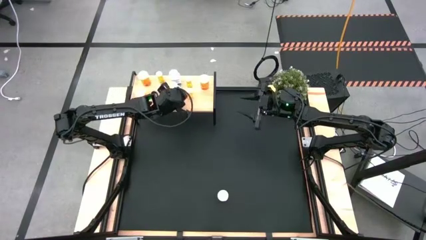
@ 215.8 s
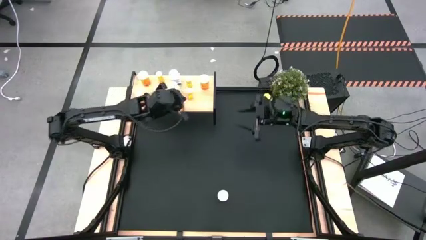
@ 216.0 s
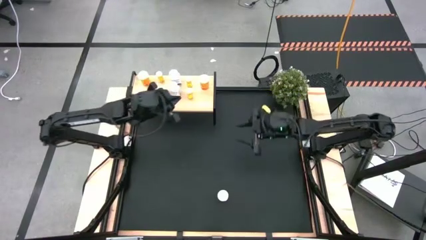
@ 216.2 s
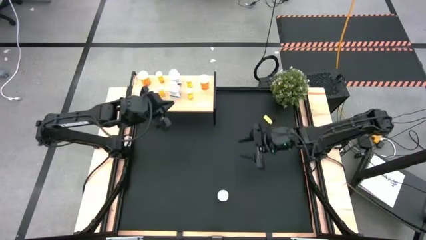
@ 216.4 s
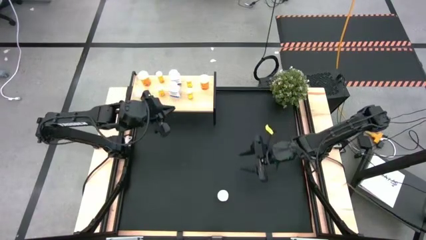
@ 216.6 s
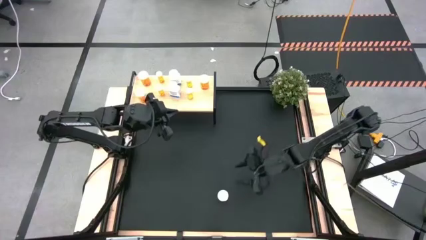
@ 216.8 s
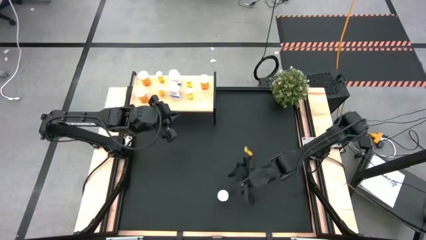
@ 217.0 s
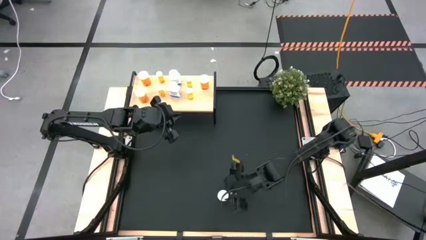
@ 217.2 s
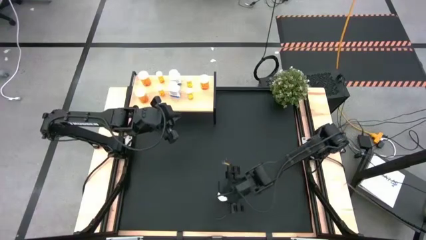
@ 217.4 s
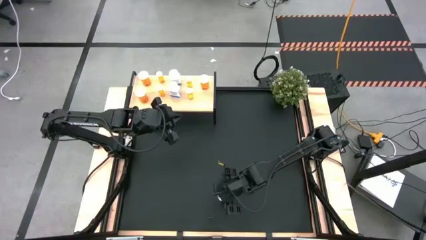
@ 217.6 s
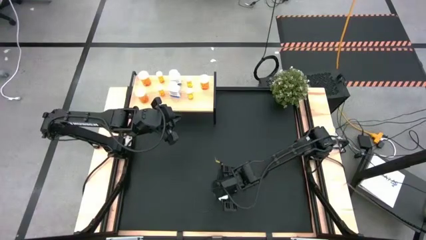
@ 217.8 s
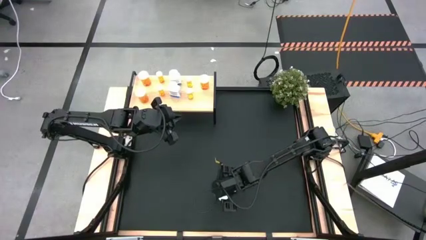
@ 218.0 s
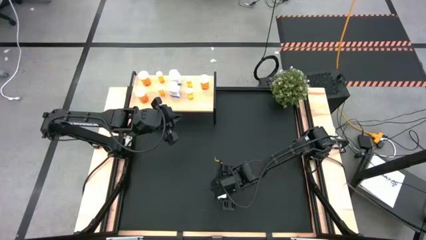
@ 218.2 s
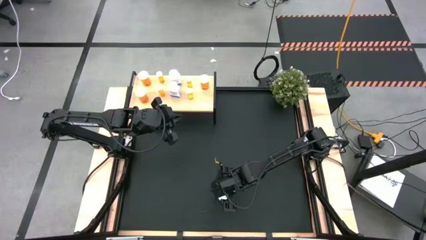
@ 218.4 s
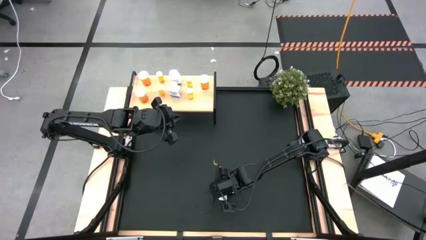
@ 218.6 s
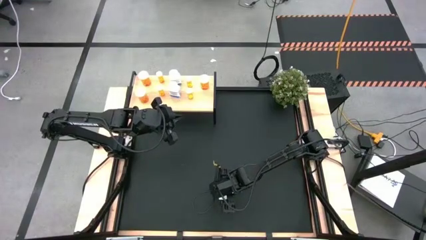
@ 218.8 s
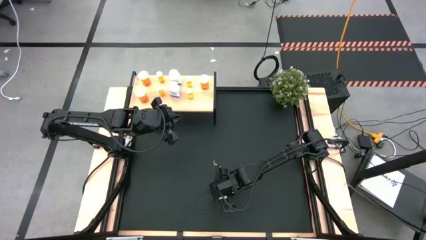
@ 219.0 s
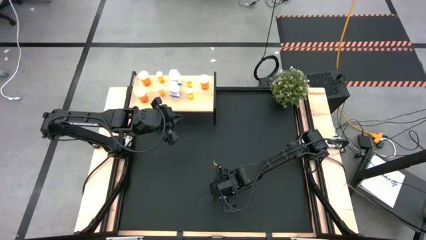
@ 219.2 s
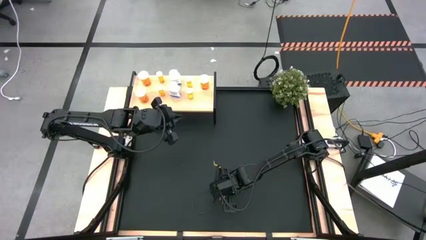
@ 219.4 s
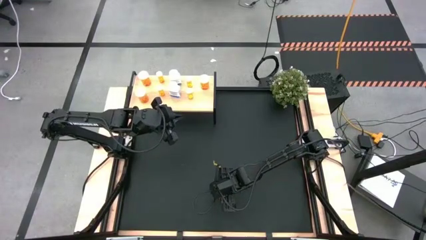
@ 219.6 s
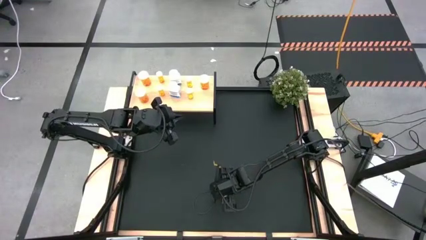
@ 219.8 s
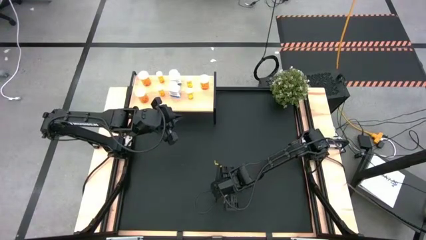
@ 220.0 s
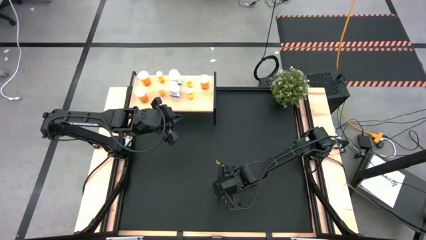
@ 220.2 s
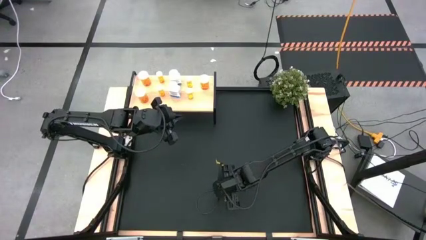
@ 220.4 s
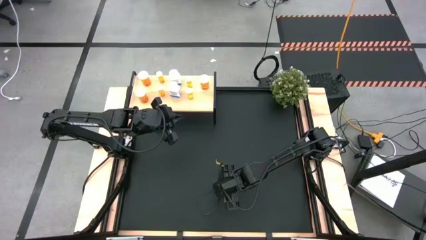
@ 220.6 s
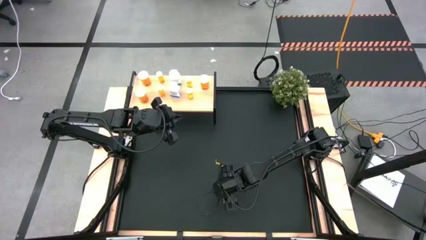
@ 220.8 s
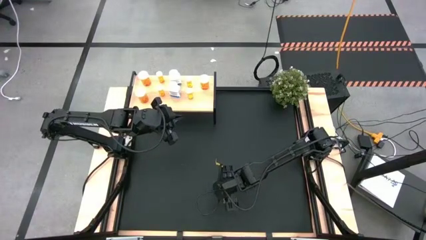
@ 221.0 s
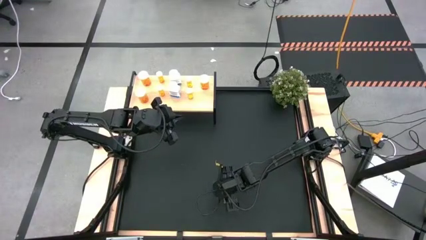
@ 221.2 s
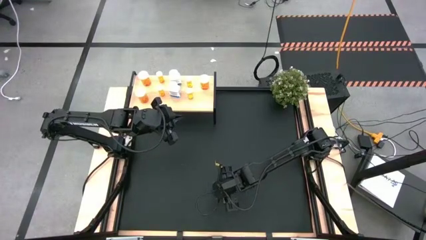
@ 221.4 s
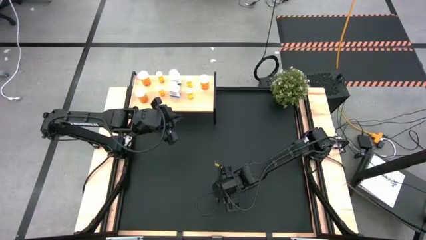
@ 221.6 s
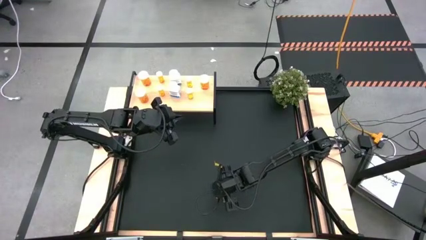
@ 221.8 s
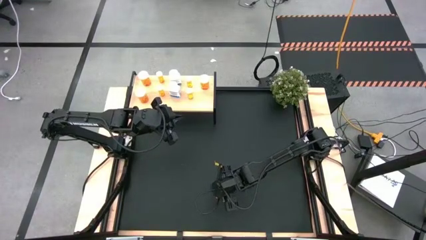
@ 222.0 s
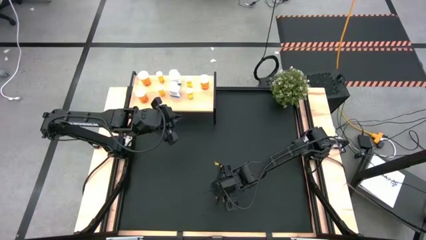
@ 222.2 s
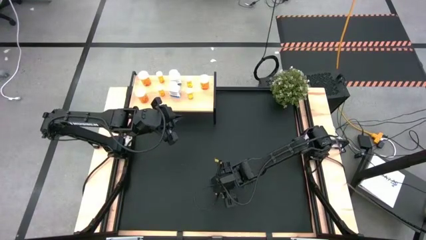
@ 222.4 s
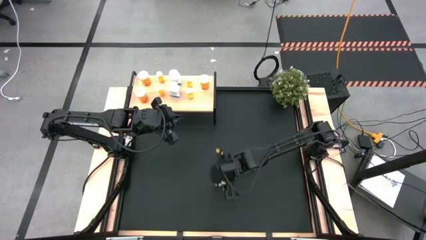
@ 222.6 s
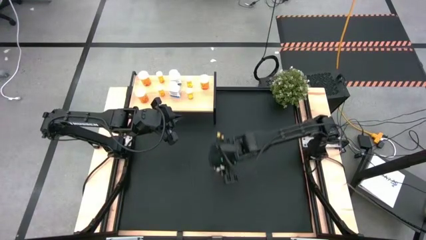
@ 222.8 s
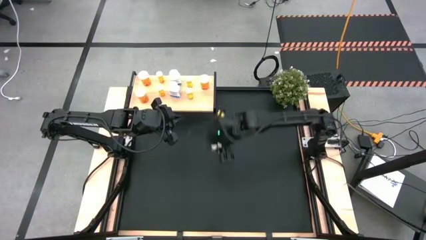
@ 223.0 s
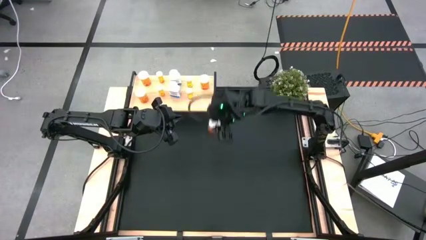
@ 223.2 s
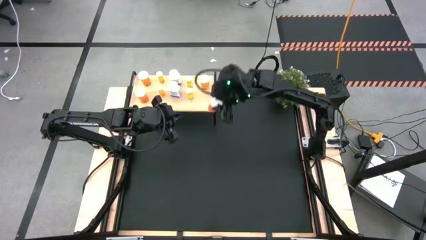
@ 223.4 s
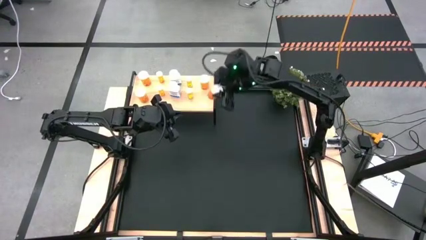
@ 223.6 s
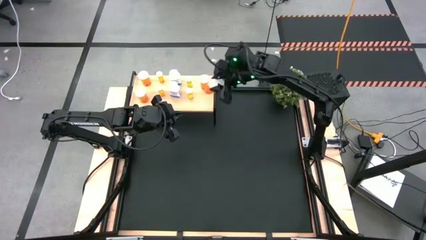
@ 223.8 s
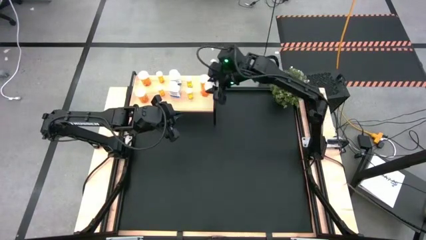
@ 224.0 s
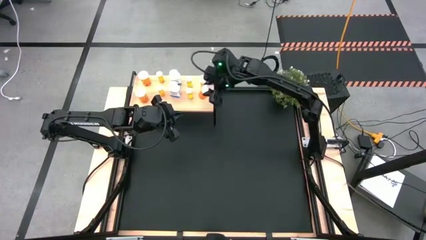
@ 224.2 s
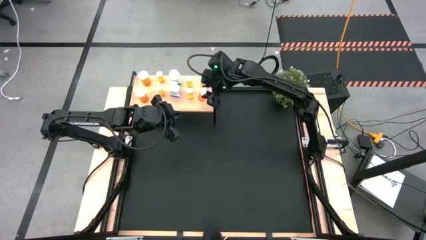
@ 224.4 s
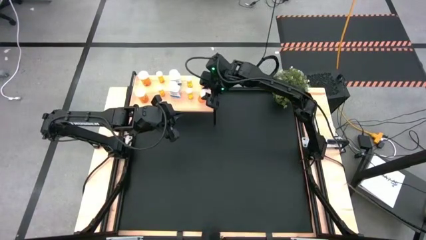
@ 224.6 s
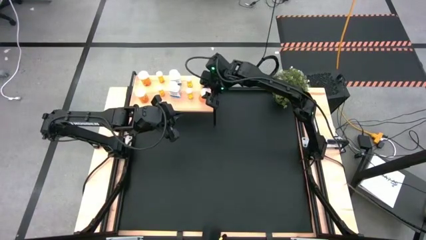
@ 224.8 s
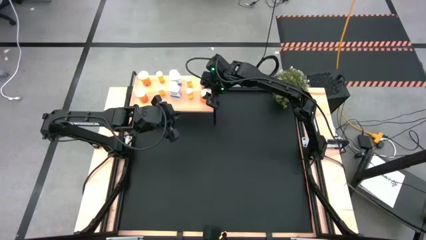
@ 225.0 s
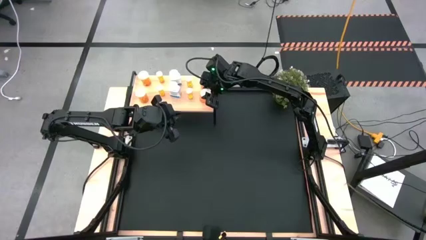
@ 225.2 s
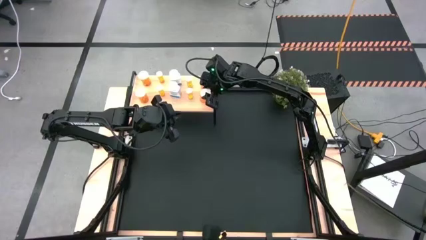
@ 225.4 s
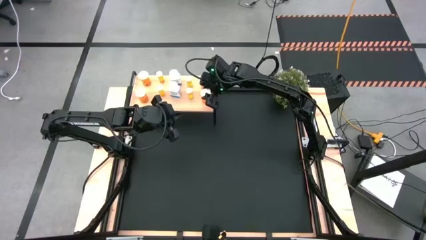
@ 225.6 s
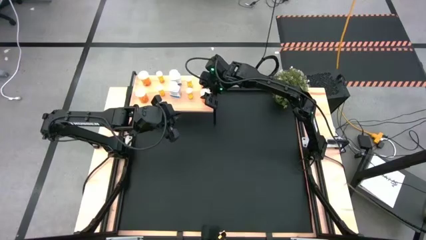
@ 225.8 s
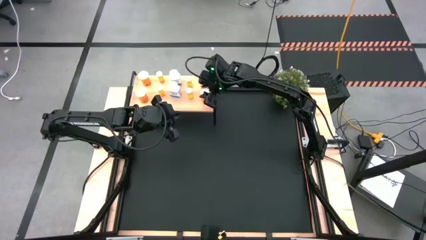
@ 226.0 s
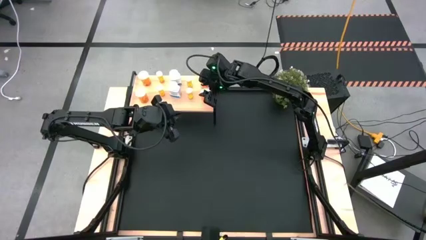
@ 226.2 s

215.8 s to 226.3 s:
Task: Pick and place medicine bottles onto shelf by color
Put the large orange pill bottle on the shelf aligned with the other large orange pill bottle
